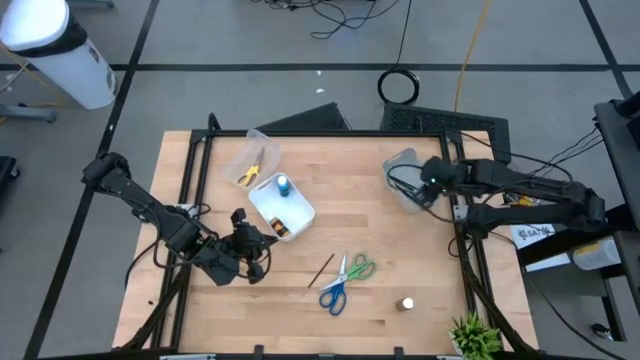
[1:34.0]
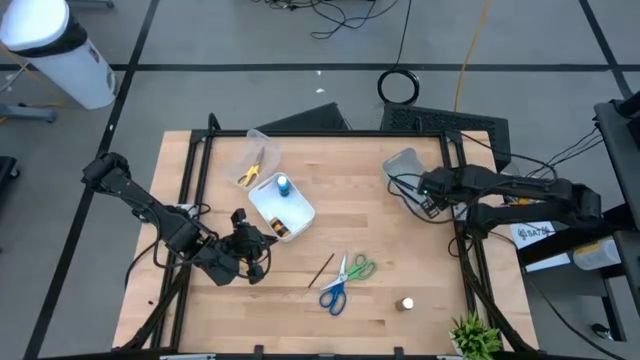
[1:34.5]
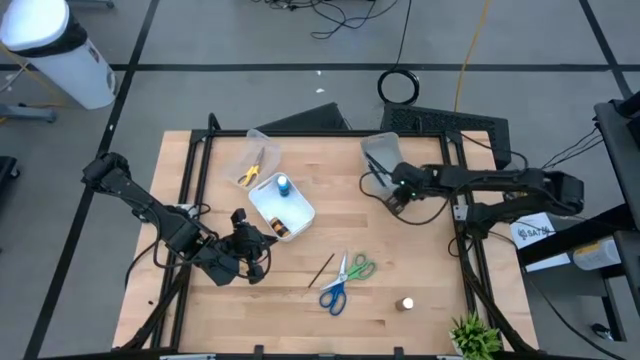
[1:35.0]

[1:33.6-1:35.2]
Task: Pick & Place Paint Supplies
Adjust the gray bin

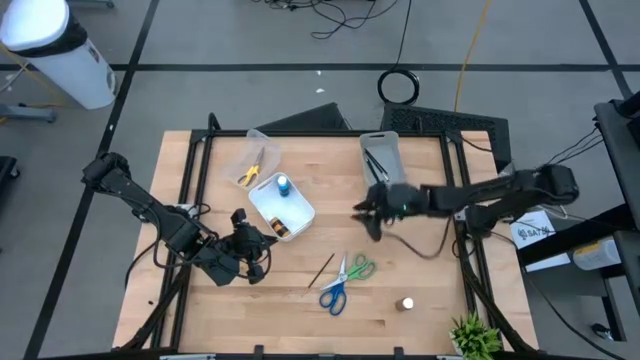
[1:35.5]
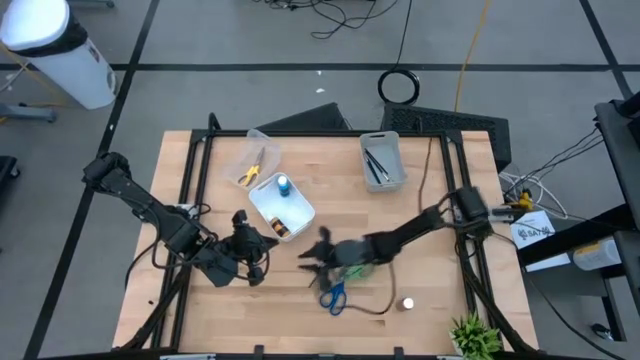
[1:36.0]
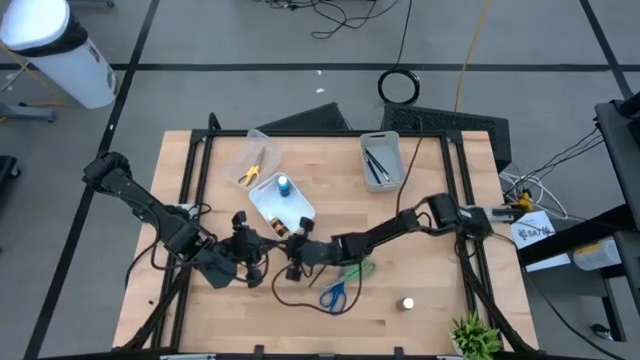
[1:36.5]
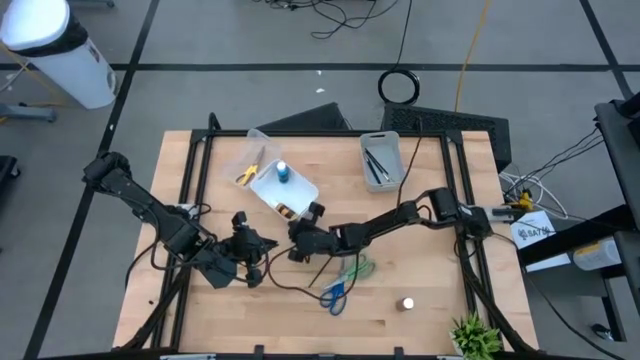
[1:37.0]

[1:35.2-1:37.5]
Adjust the white bin

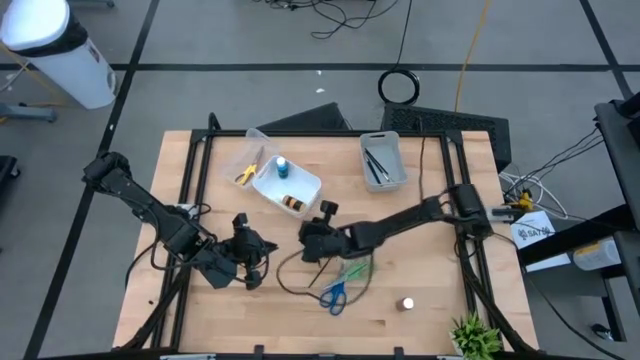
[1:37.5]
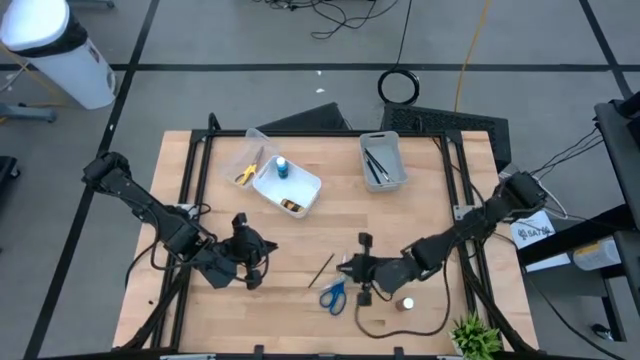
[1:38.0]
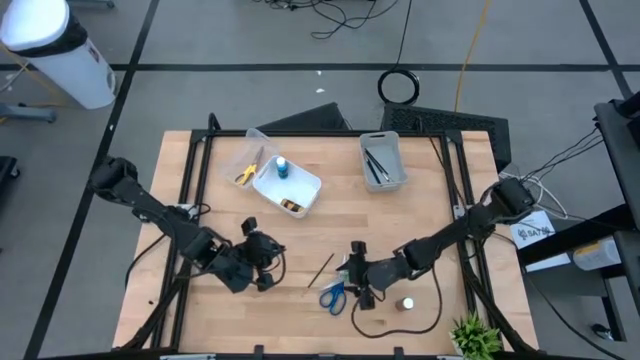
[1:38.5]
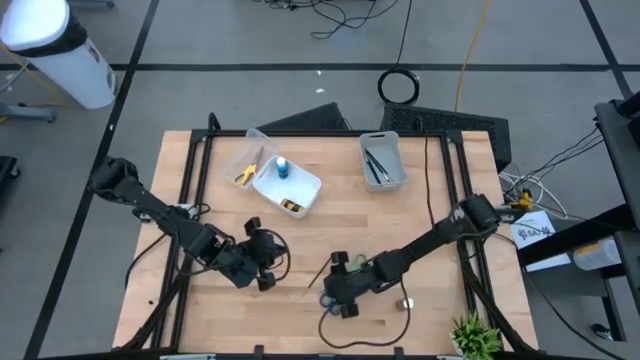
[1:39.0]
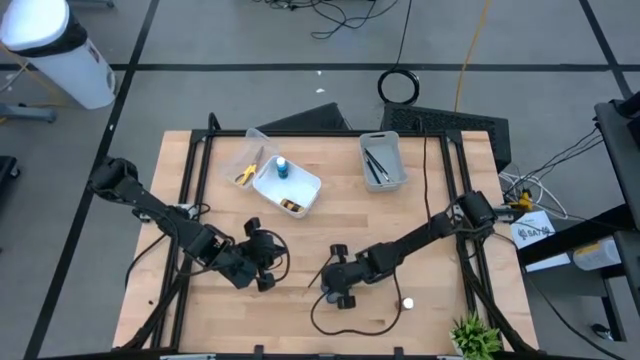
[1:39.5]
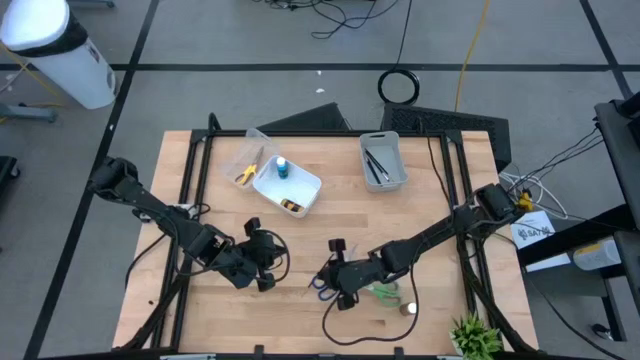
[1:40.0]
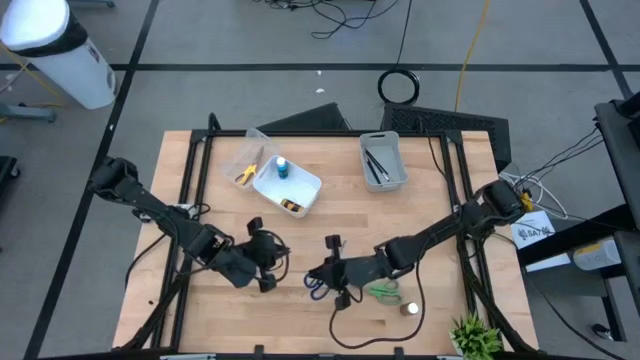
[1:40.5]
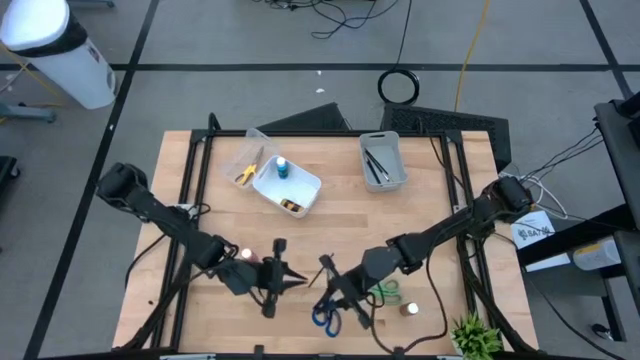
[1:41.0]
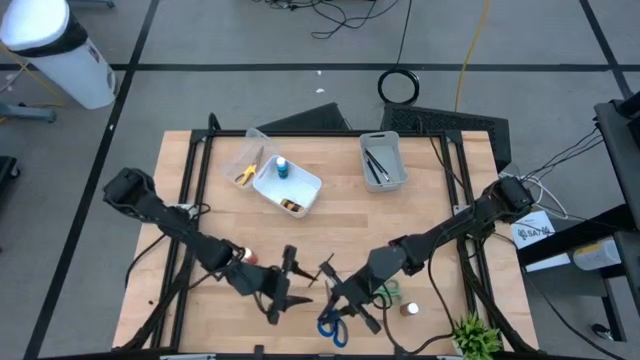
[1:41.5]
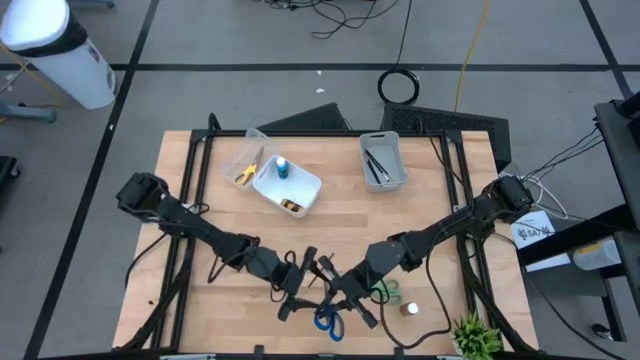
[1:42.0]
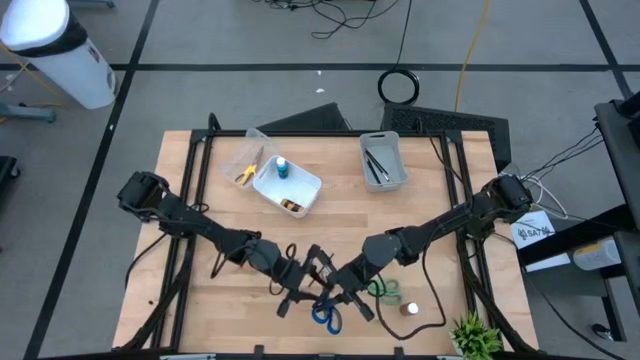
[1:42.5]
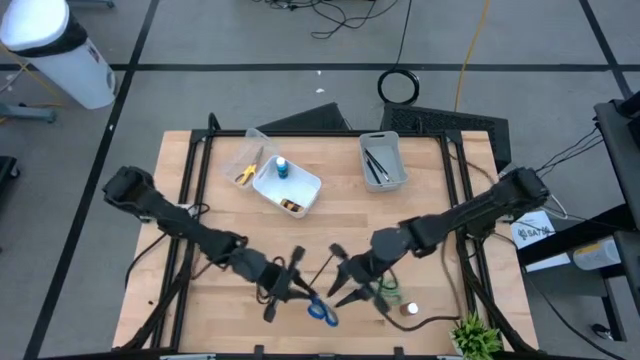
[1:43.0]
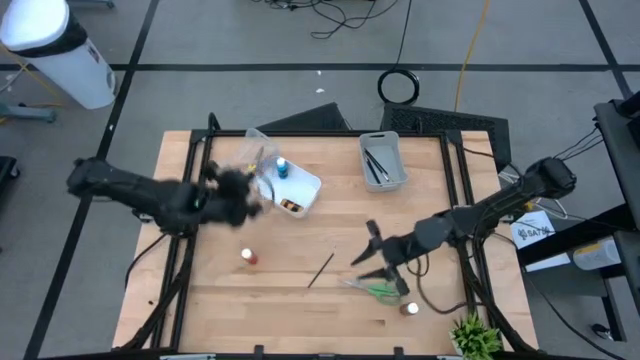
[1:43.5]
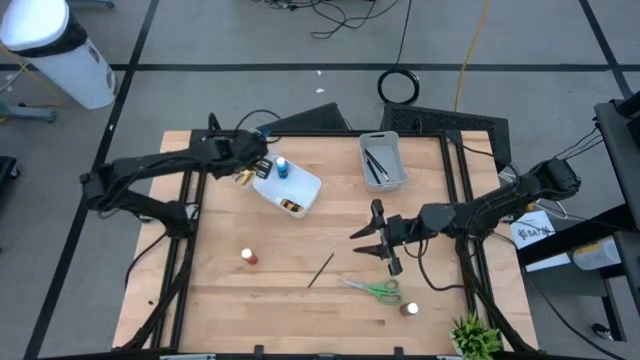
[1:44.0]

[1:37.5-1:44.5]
Put the blue scissors into the transparent bin

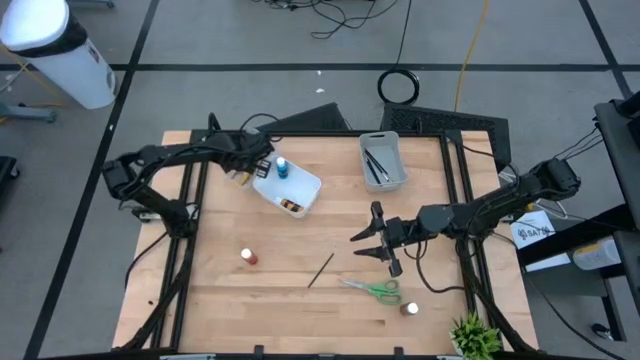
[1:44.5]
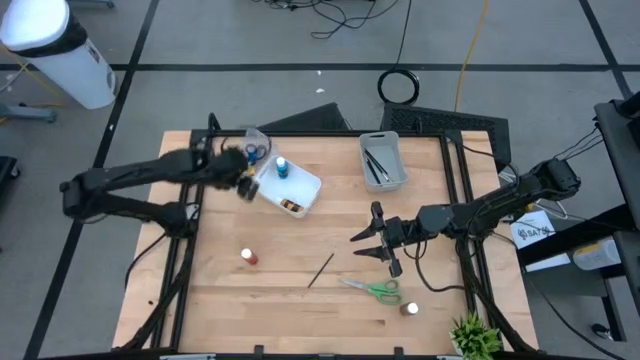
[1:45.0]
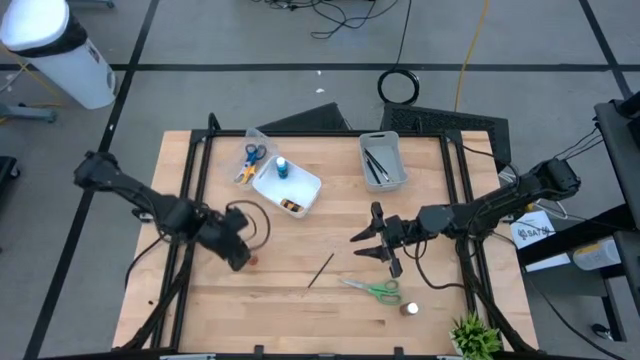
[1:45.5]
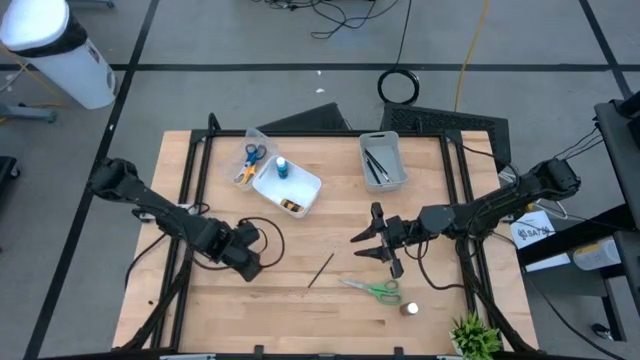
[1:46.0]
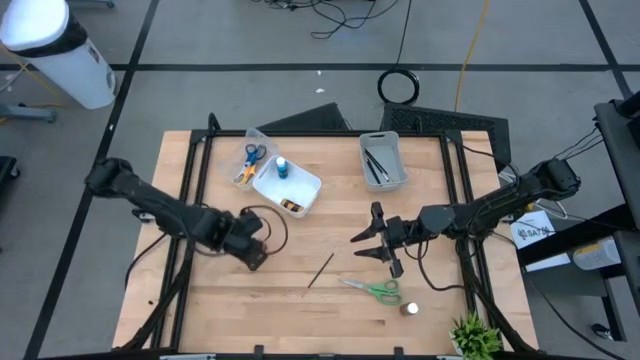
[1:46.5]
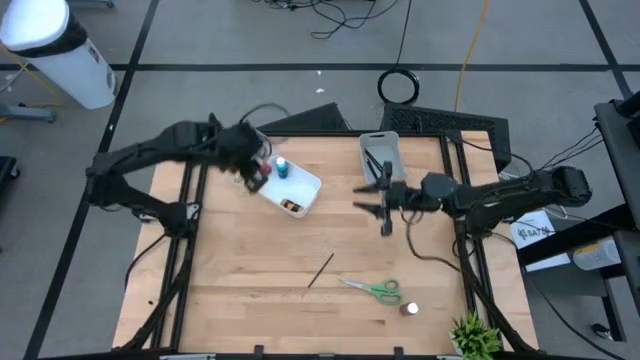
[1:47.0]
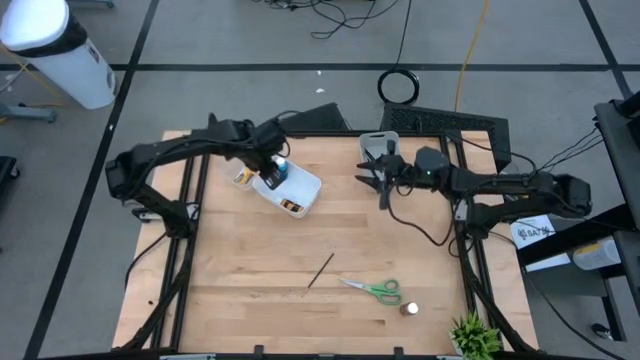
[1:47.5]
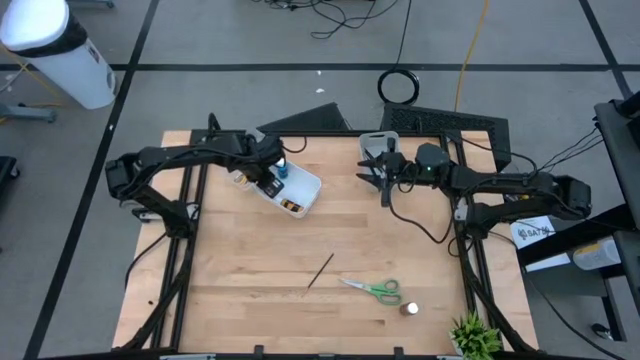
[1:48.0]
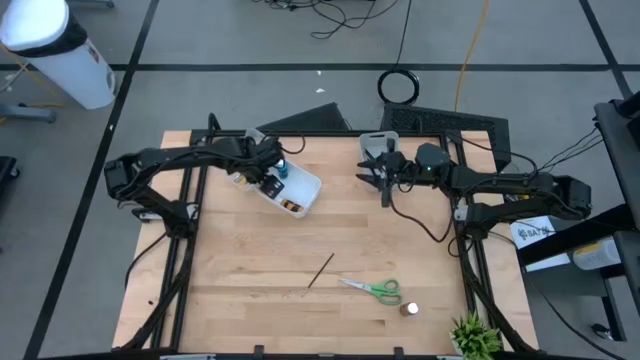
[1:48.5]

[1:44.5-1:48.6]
Put the orange paint bottle into the white bin

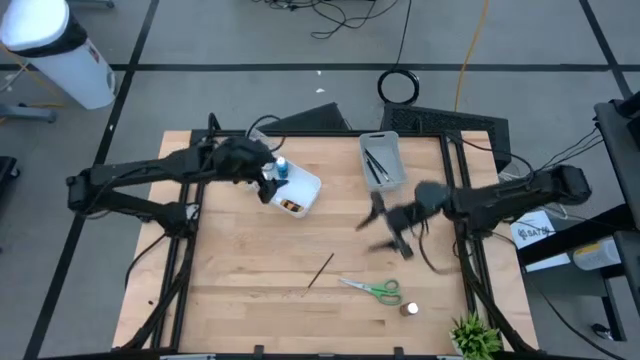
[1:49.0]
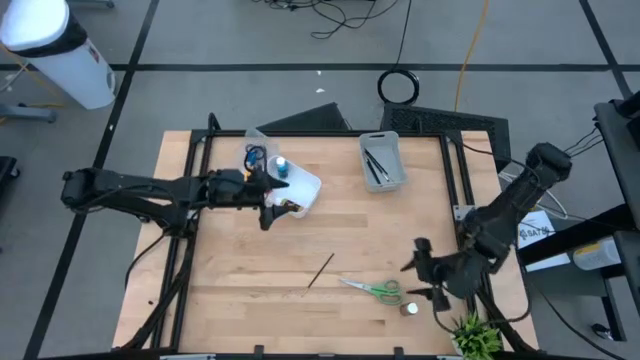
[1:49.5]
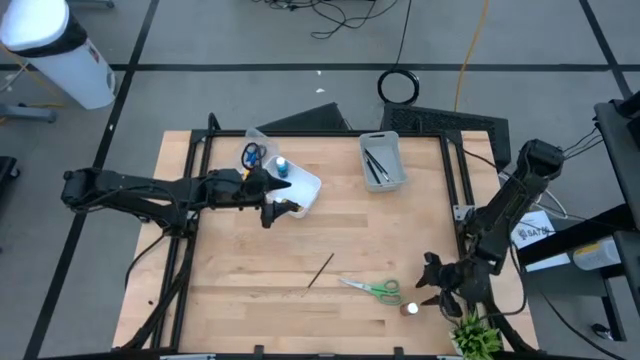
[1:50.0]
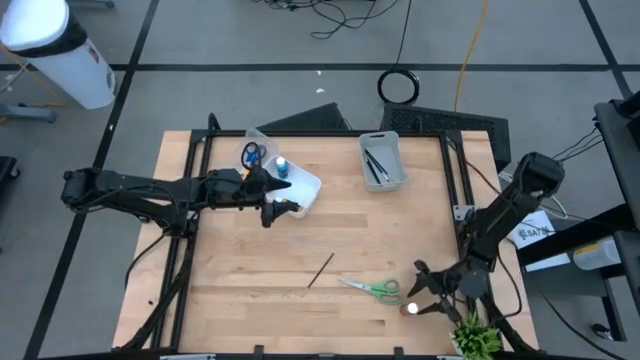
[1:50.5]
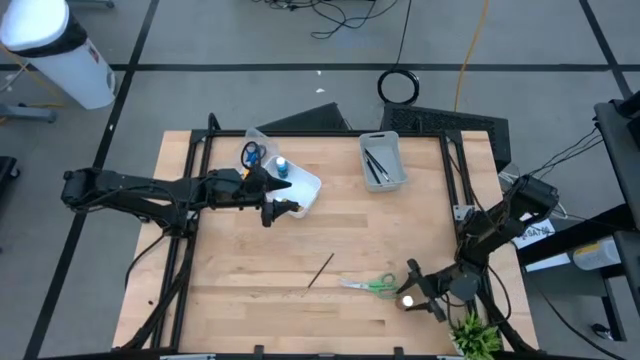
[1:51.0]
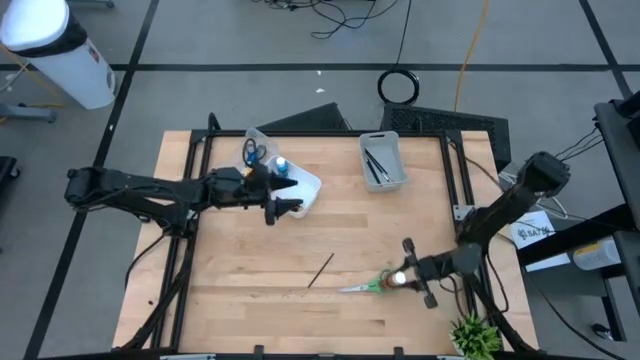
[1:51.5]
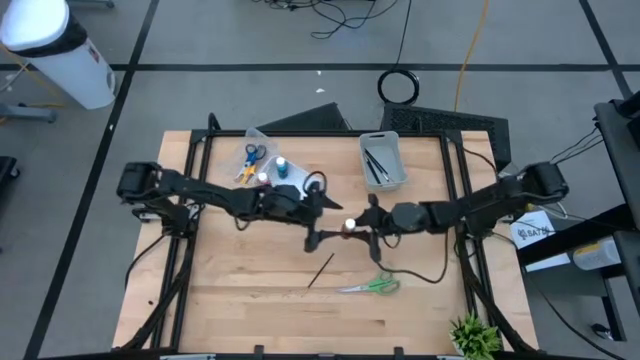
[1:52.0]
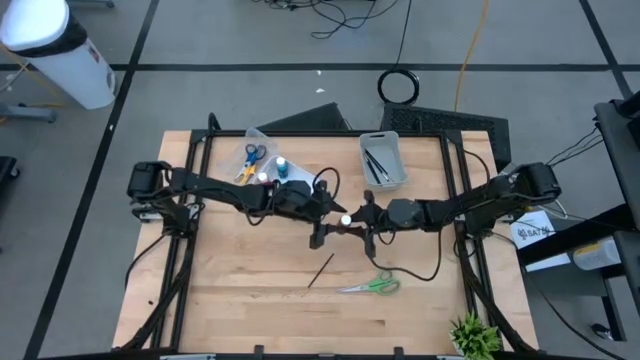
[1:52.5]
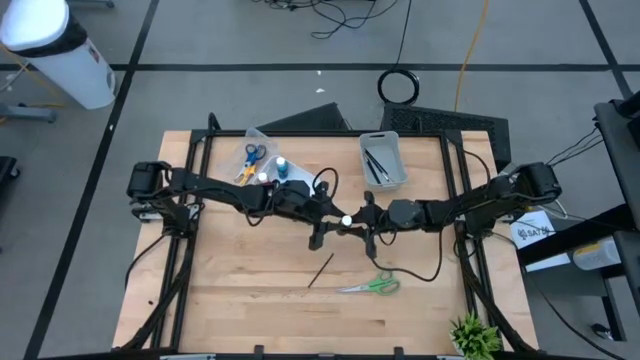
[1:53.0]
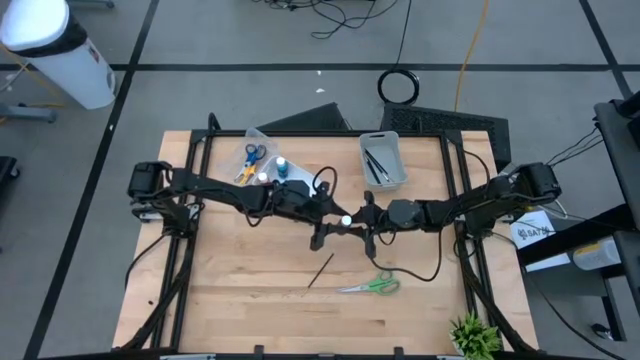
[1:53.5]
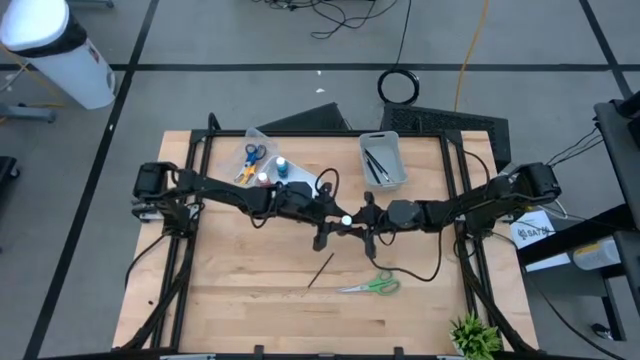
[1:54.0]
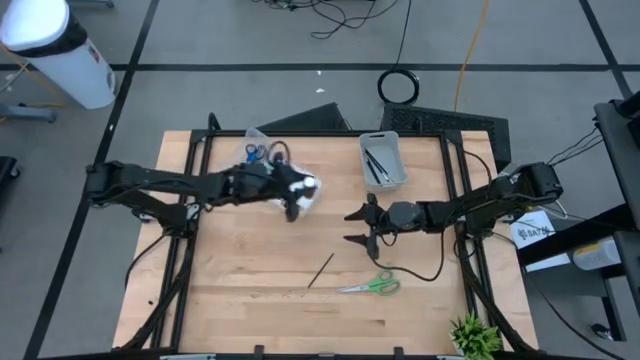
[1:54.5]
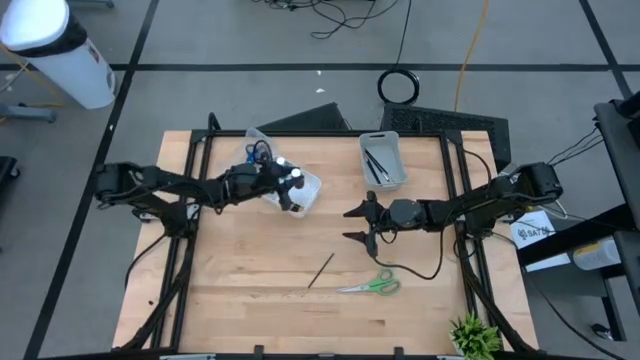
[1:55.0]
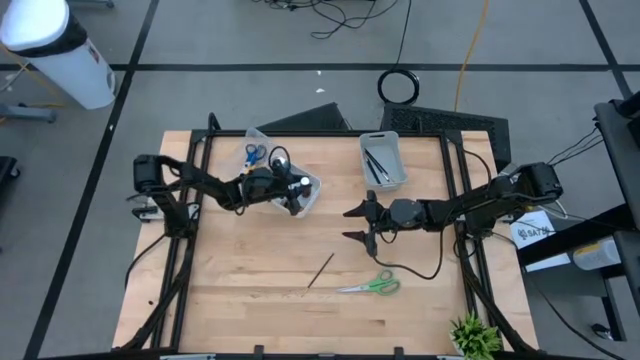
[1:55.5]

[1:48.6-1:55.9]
Put the brown paint bottle into the white bin
